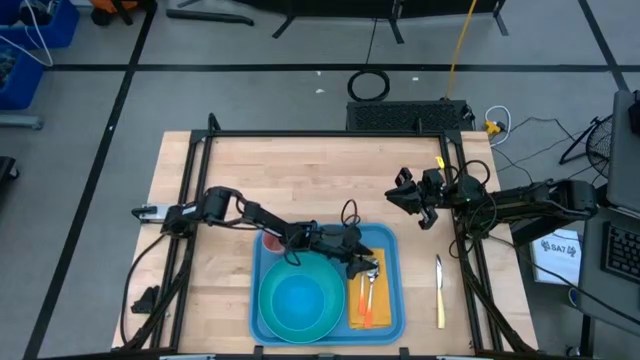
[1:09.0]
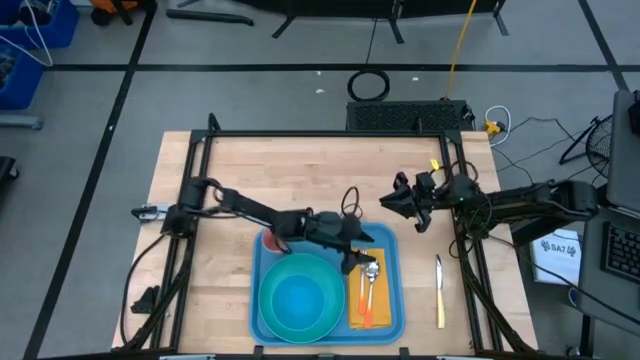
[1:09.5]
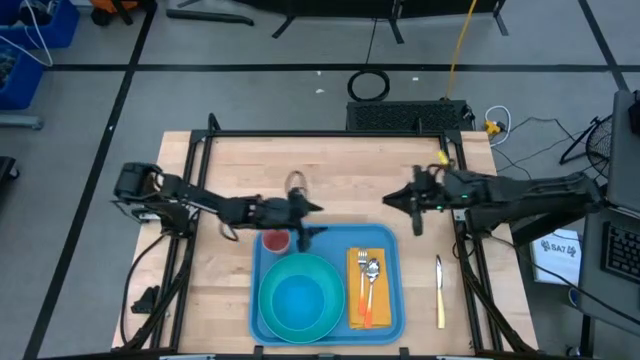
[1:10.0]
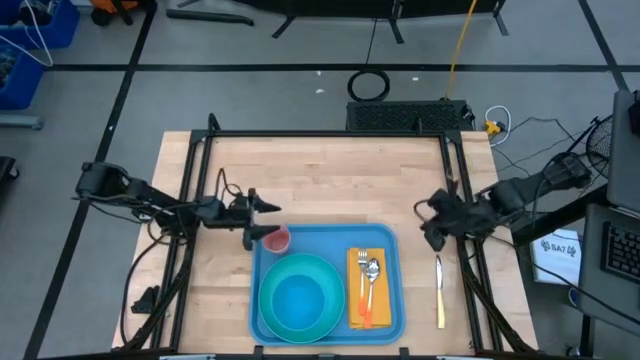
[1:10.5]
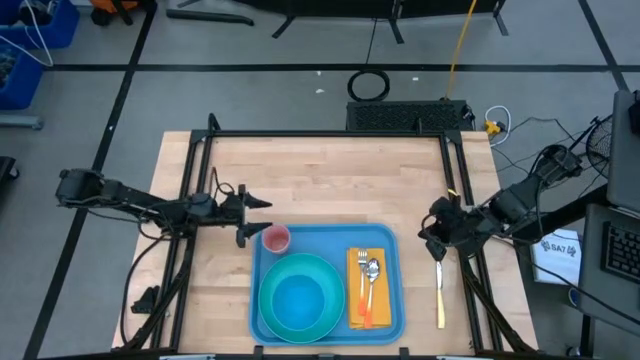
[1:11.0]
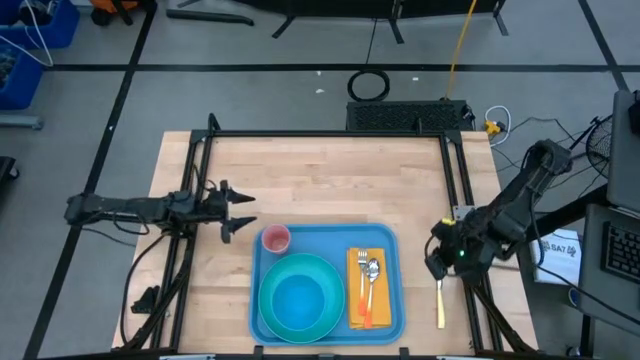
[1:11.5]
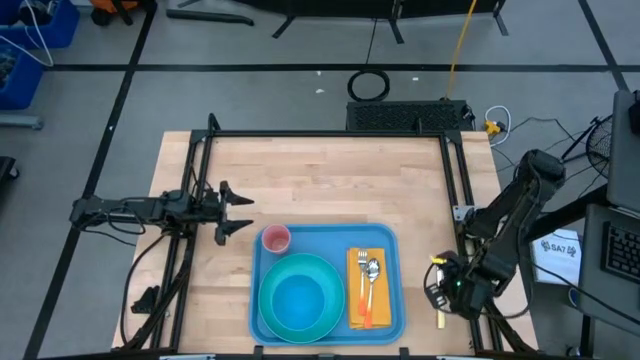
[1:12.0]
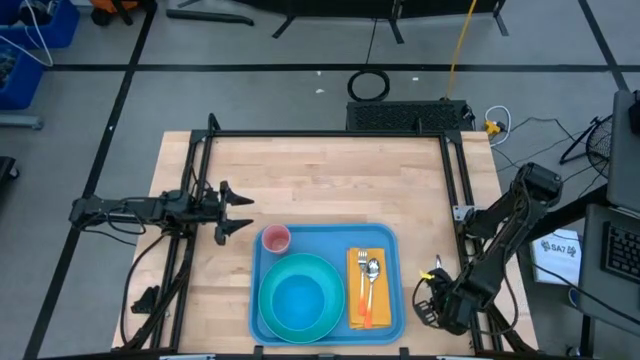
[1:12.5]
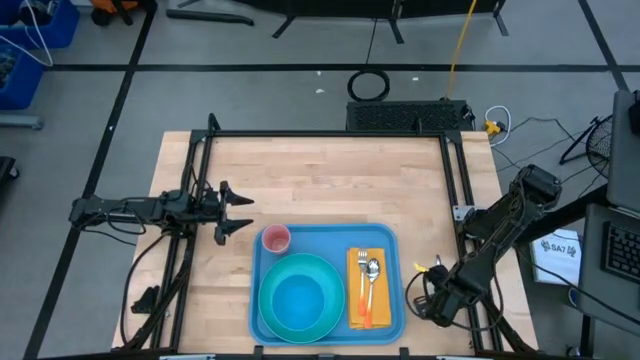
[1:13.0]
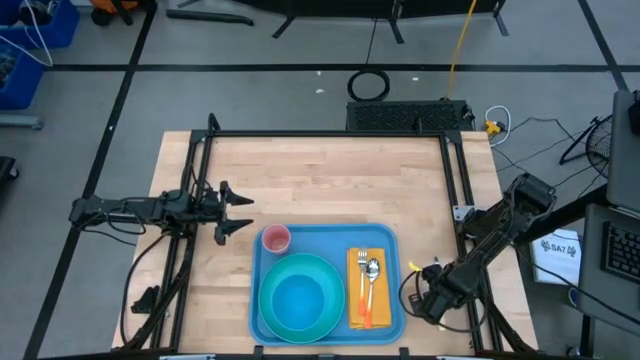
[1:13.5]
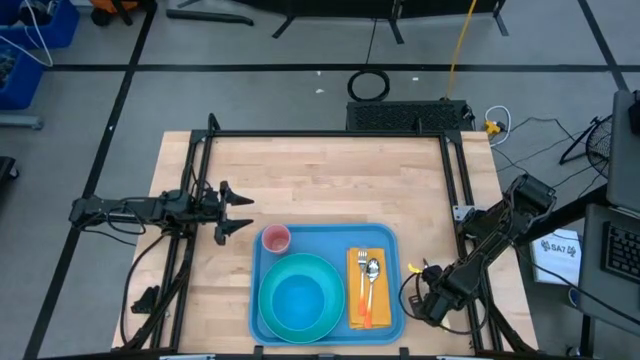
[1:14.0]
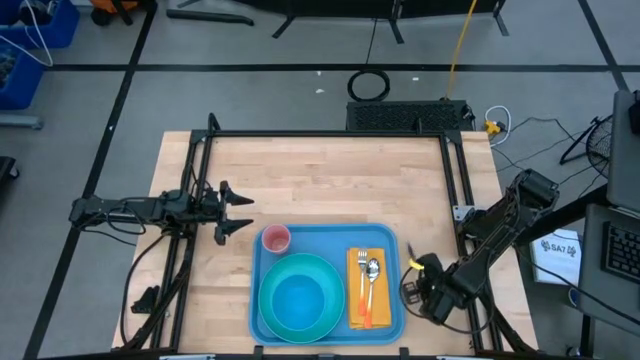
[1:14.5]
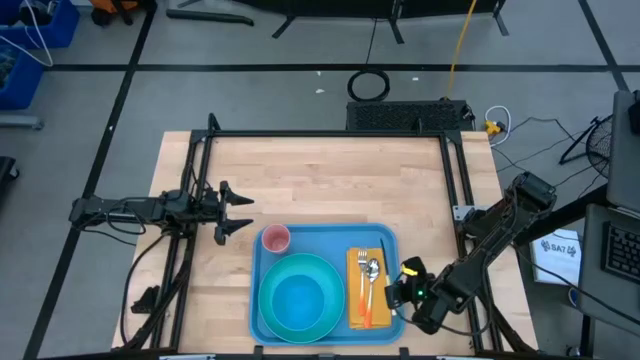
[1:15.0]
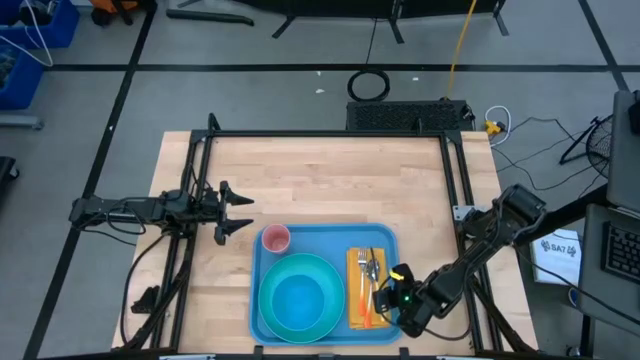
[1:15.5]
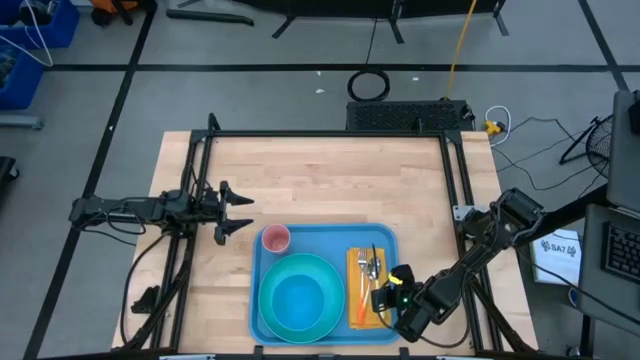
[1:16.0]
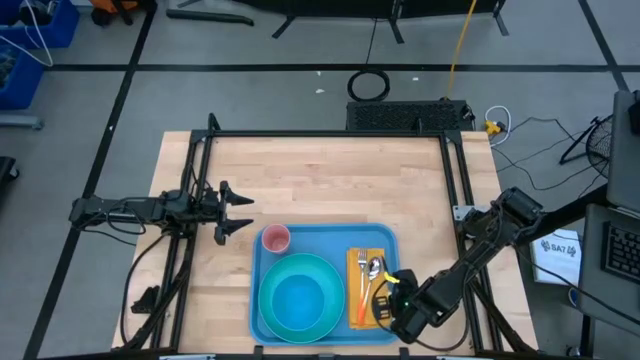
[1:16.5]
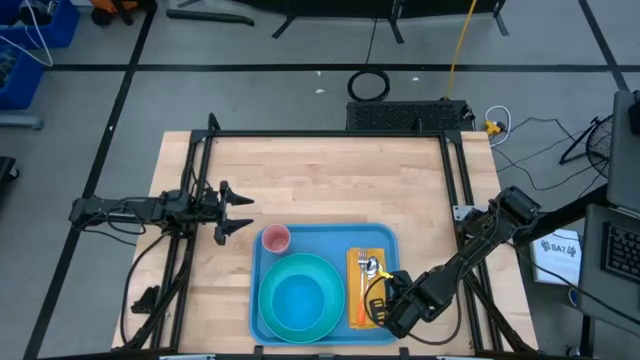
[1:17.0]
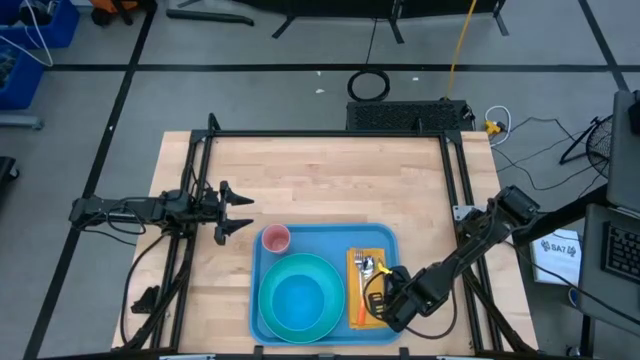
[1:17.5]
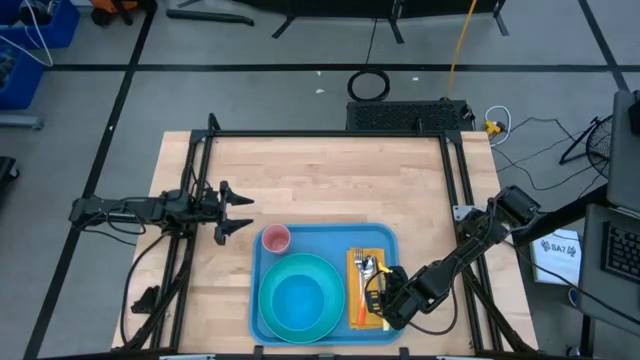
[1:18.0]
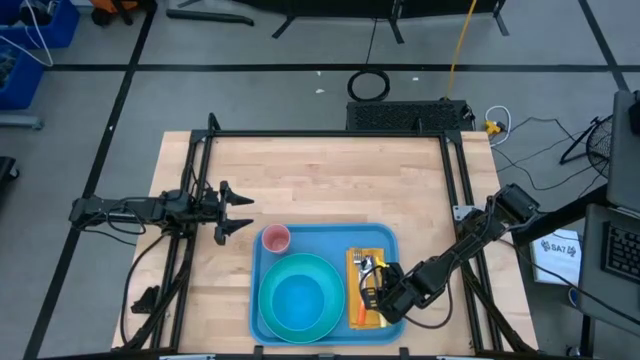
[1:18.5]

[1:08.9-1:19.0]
Task: Set up tray
Put the yellow knife on the yellow napkin to the right of the orange spoon

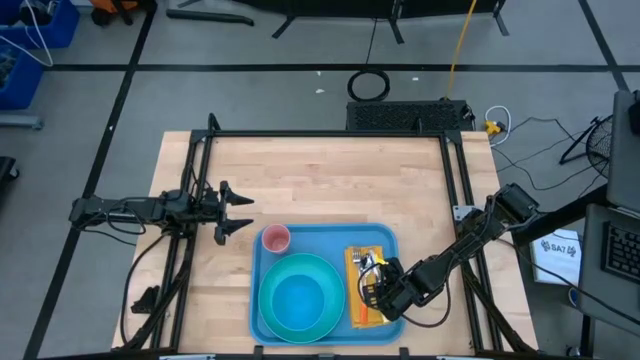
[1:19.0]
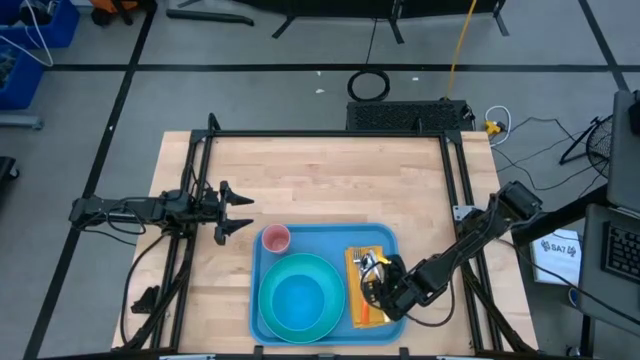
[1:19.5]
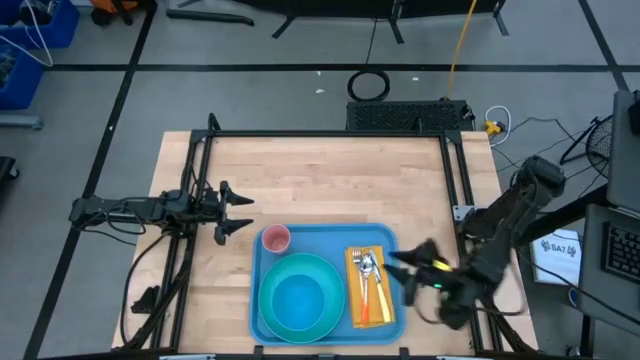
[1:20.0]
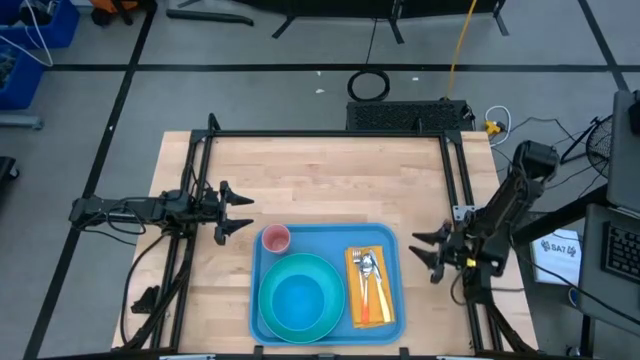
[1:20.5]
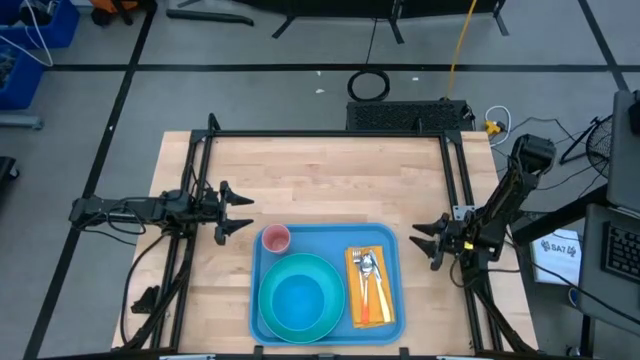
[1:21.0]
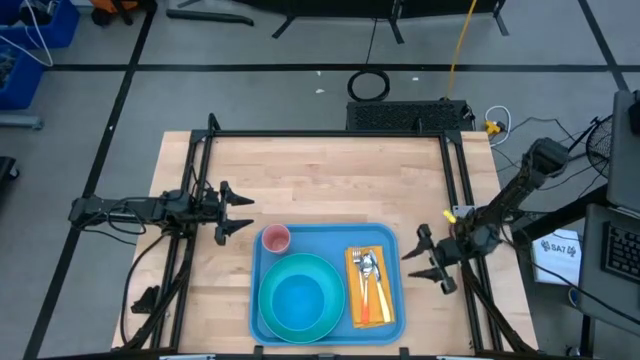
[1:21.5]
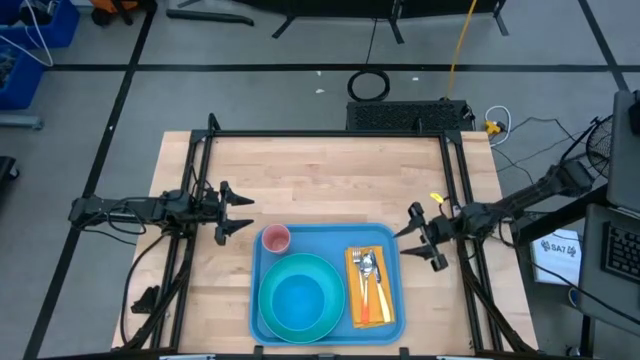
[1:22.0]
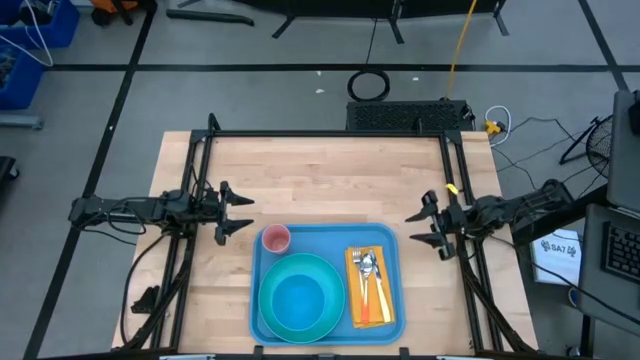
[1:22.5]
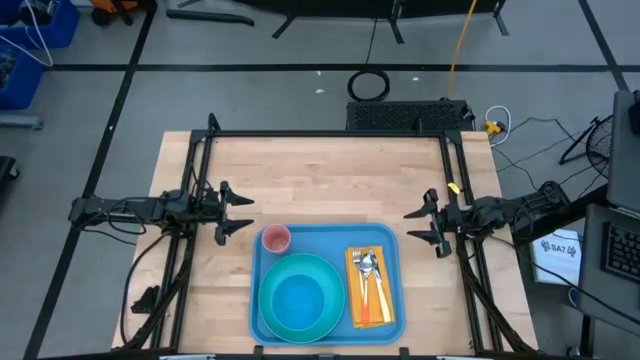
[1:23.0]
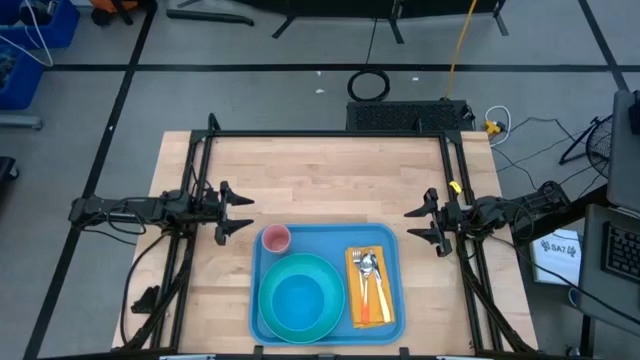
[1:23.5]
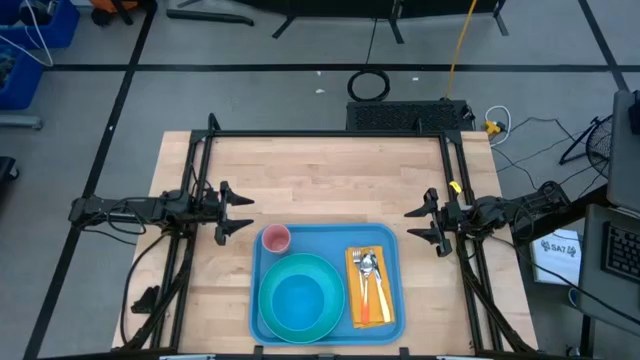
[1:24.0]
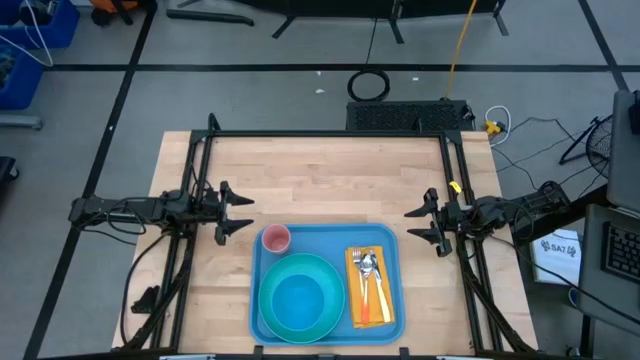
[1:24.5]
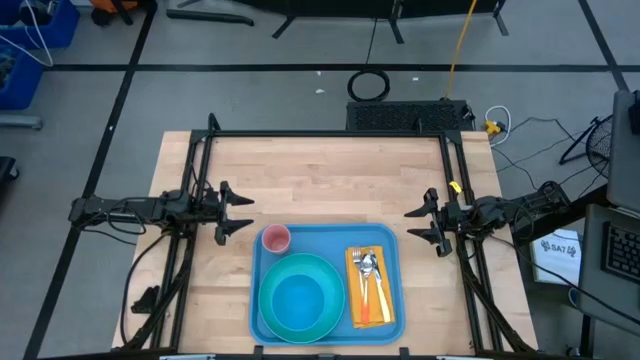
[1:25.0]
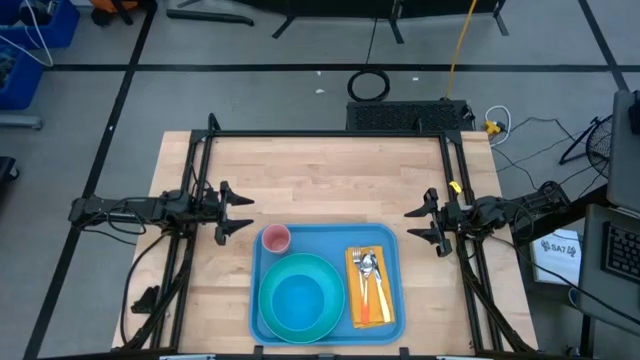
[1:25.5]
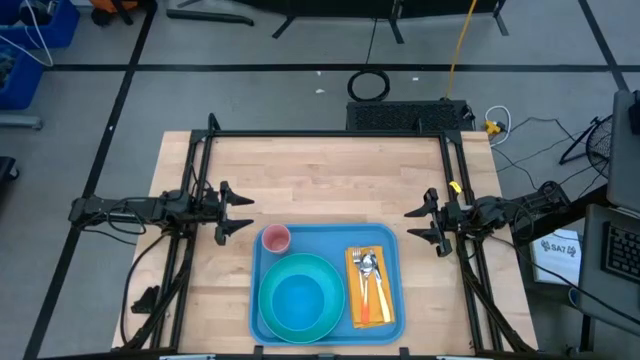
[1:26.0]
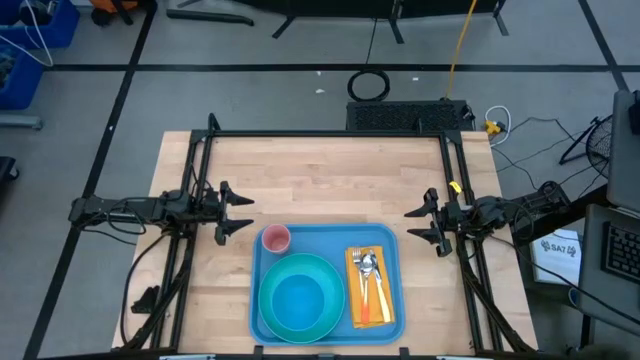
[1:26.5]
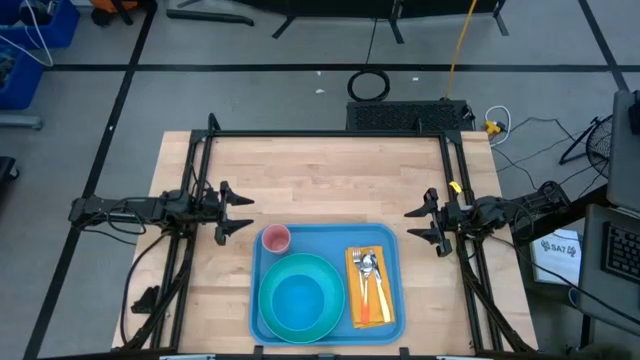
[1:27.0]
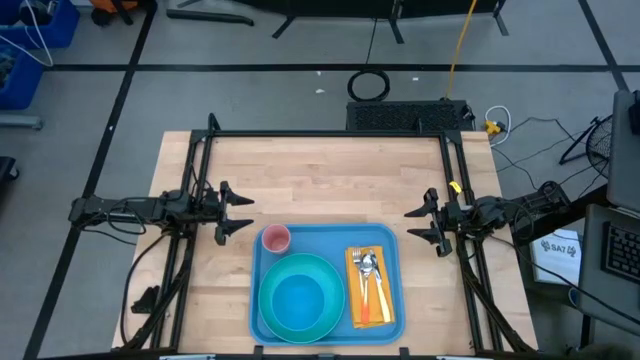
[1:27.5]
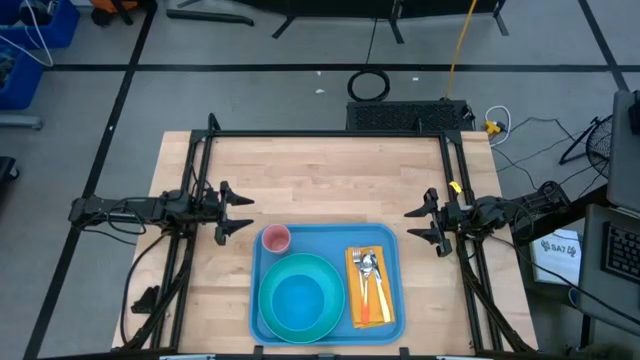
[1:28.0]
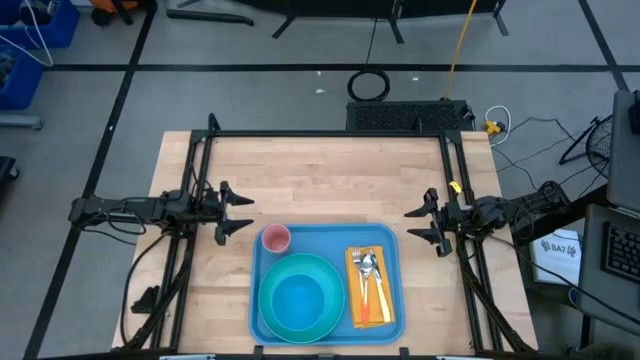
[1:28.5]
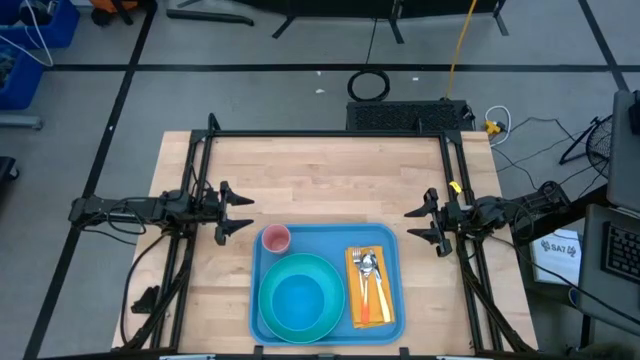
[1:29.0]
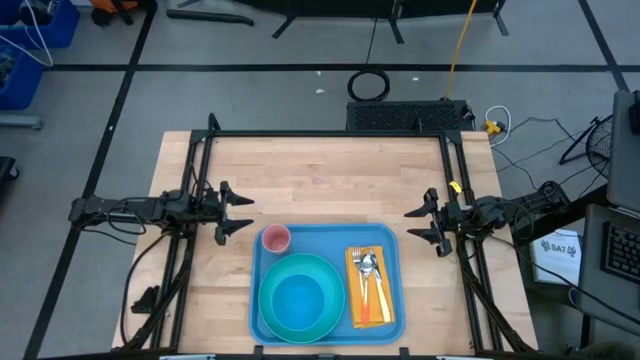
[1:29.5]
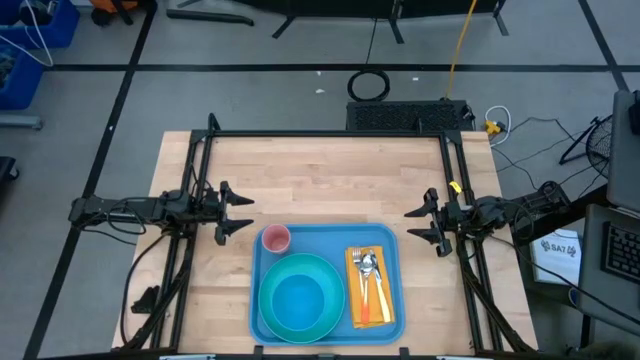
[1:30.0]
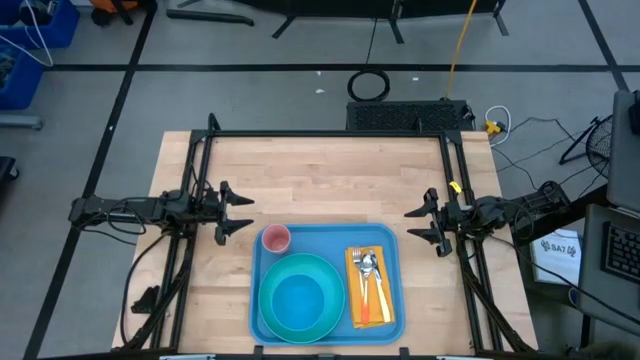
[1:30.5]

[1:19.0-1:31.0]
Return to Home Position
